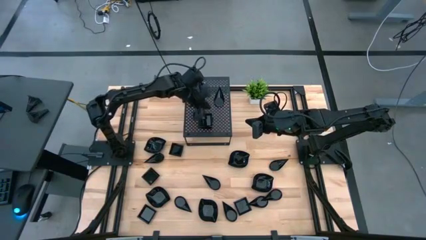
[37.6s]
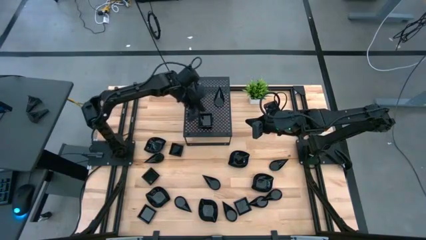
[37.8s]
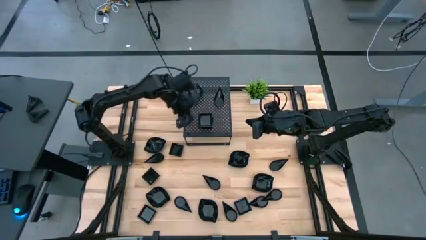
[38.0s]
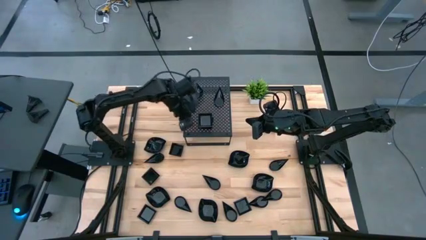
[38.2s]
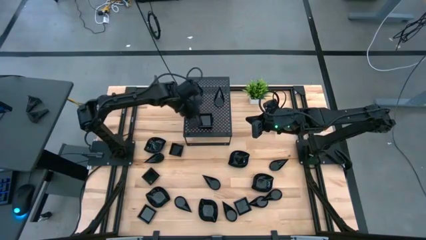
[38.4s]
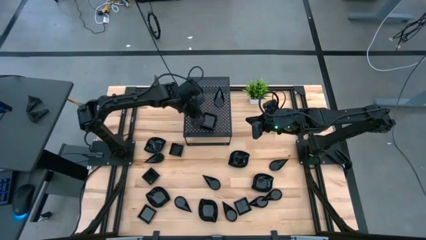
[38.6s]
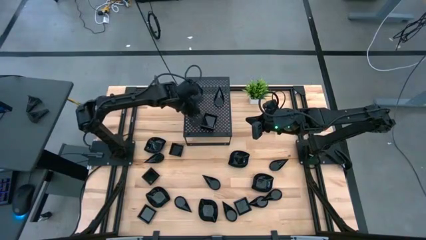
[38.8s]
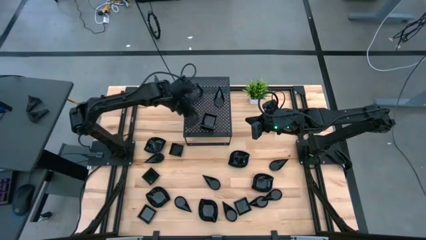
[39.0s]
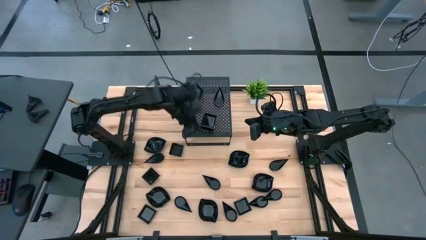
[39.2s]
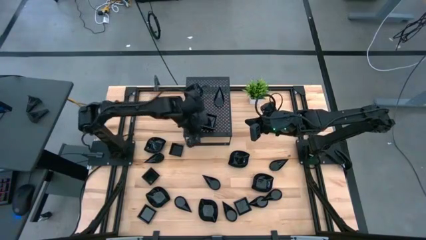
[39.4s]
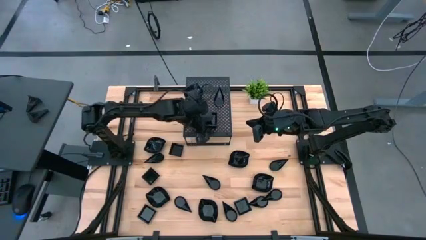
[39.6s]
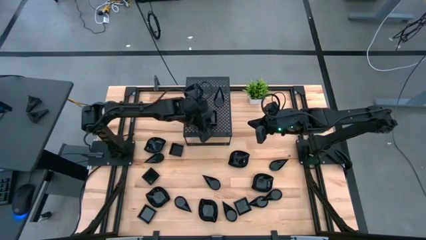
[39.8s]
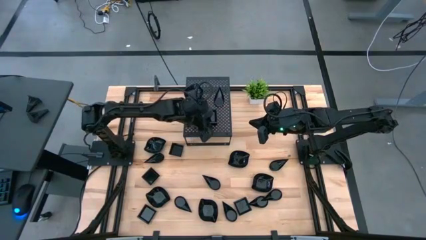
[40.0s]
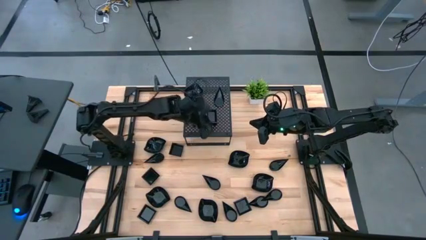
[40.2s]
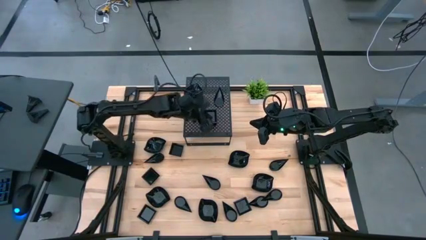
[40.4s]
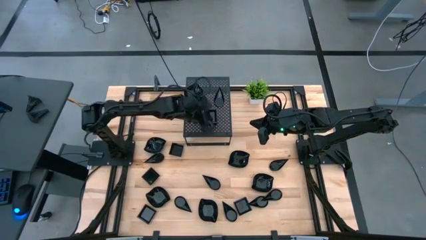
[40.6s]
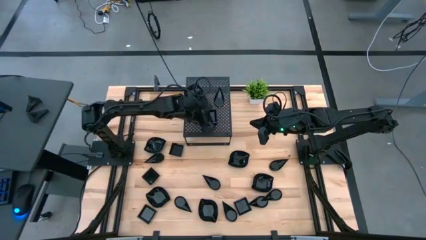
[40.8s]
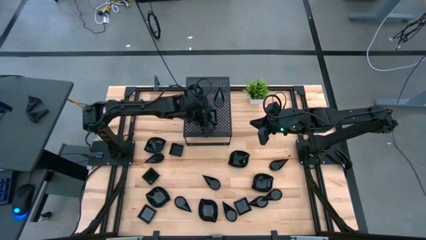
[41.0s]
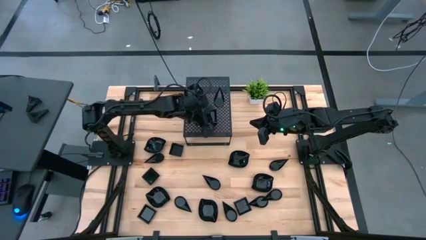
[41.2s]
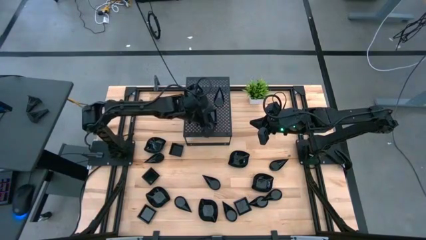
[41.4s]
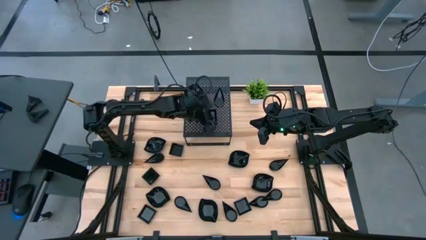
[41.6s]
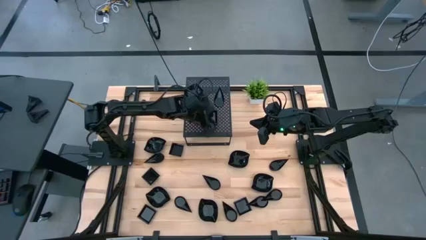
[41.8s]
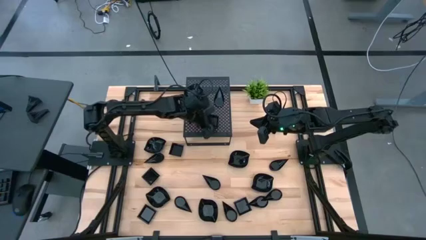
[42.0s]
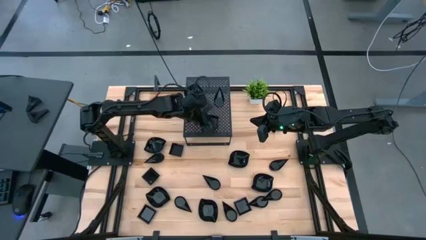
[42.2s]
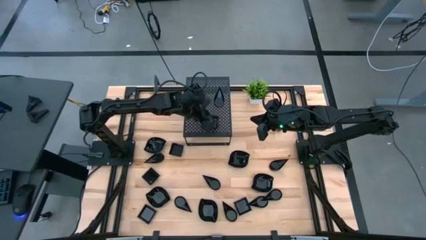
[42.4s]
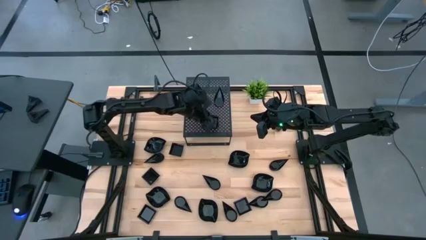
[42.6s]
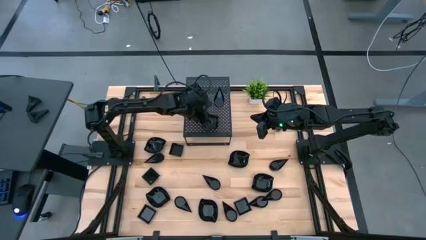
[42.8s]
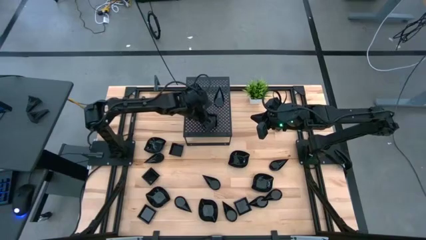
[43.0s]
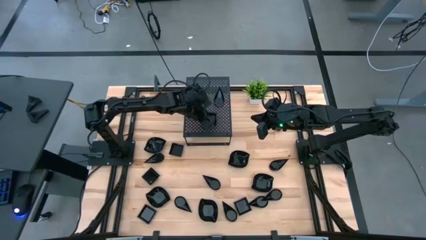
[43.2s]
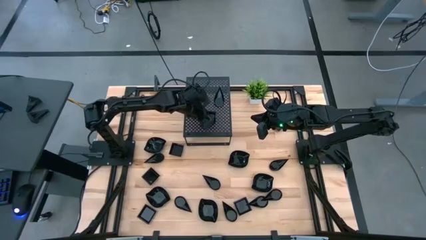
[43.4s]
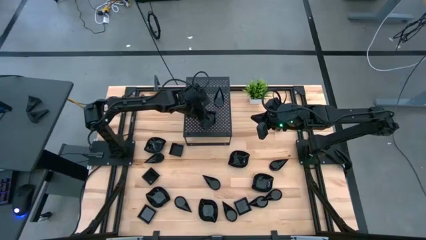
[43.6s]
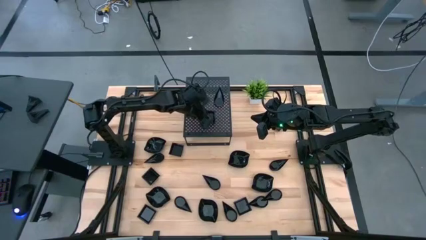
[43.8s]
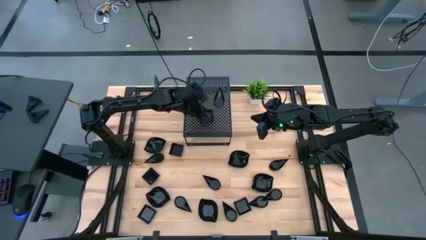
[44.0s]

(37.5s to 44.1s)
Task: Pick & Place Mini shaped plates
Adjust the square plates

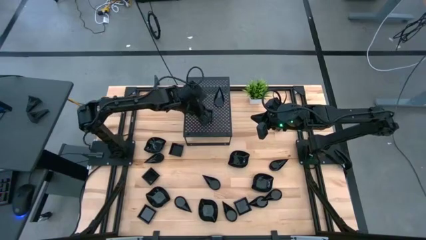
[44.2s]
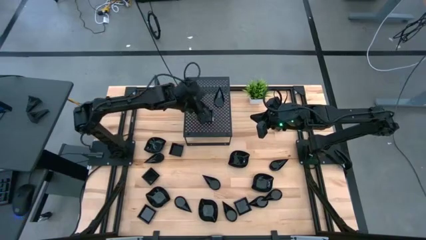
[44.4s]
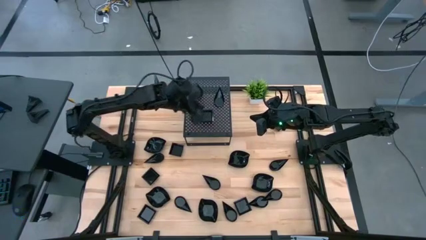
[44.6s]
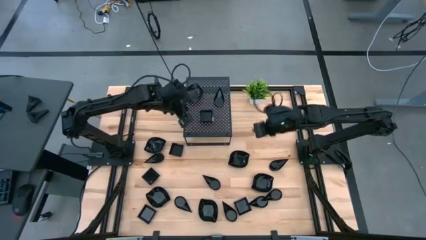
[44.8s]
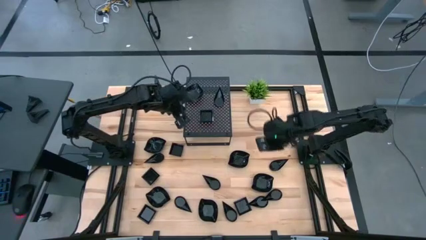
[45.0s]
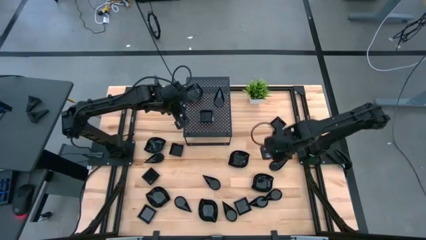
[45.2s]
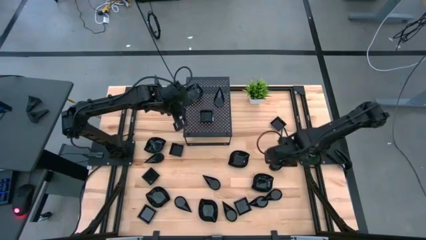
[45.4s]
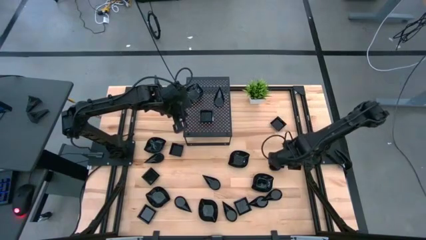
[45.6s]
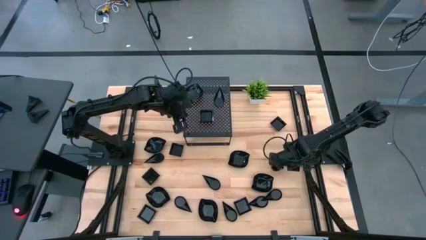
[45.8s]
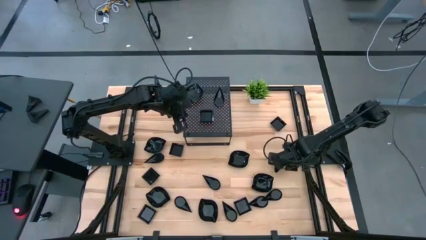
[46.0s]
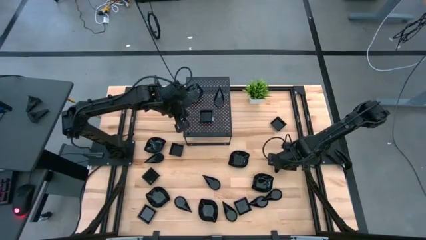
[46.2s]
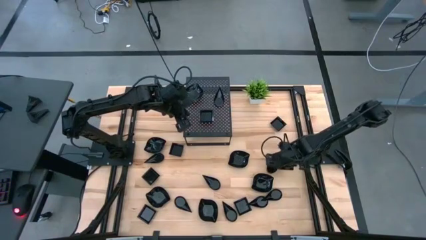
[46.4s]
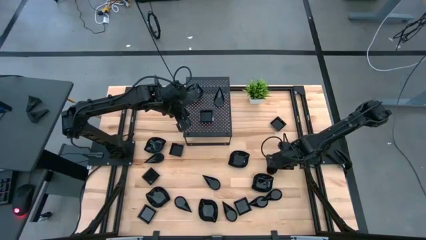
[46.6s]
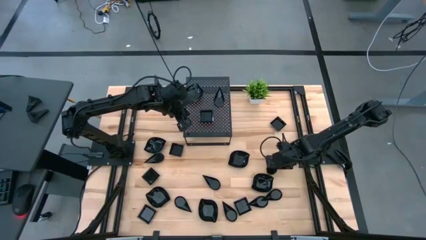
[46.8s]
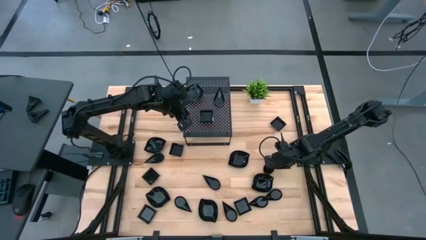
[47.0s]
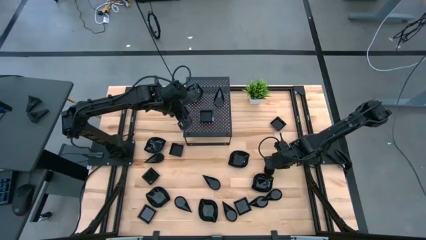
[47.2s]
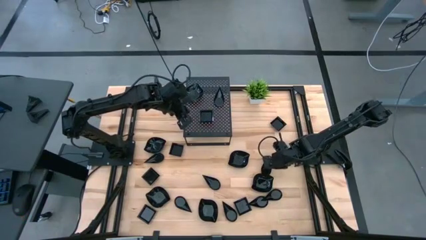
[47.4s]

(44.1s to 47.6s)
Stack the drop shaped plate on top of the other drop shaped plate on the shelf

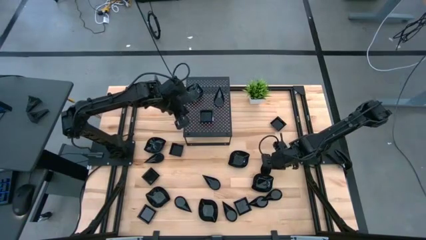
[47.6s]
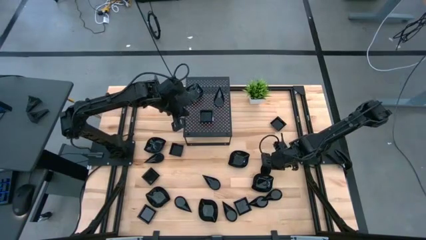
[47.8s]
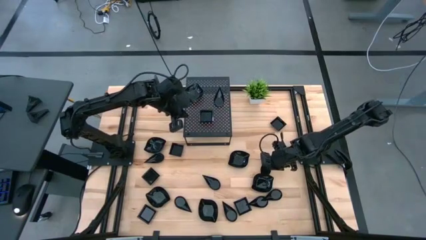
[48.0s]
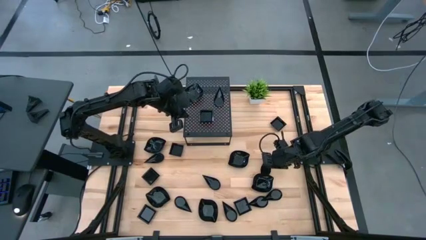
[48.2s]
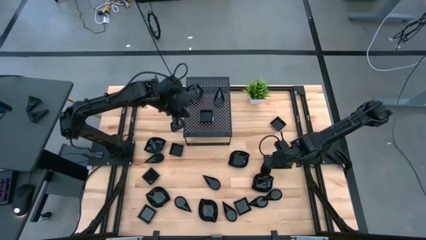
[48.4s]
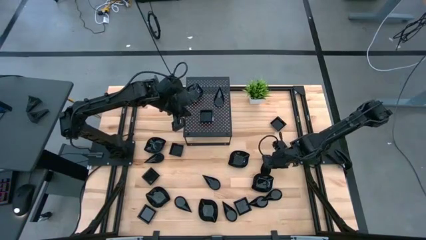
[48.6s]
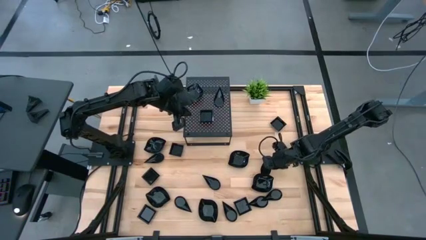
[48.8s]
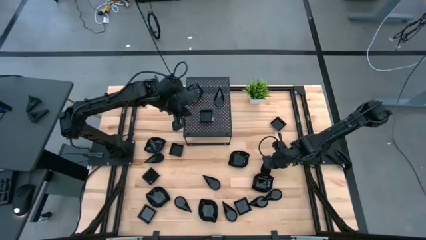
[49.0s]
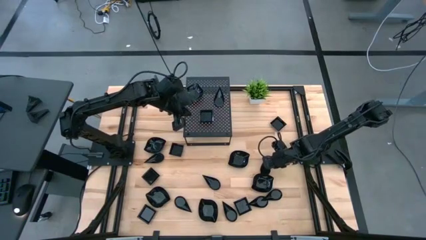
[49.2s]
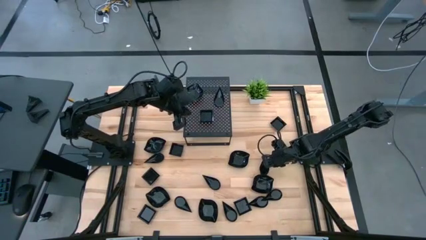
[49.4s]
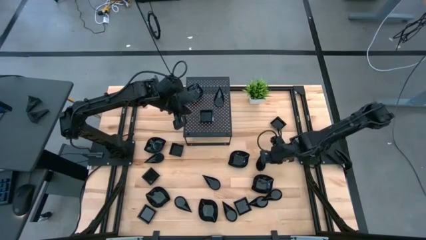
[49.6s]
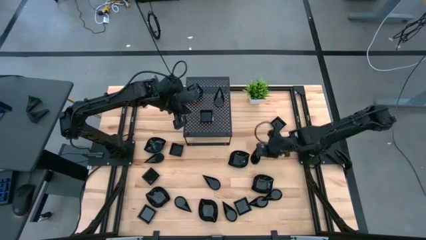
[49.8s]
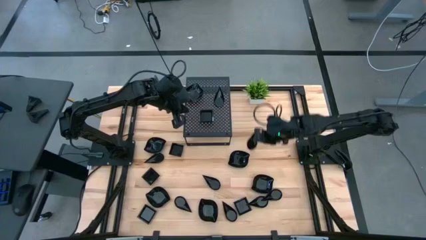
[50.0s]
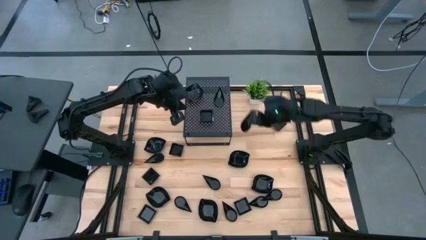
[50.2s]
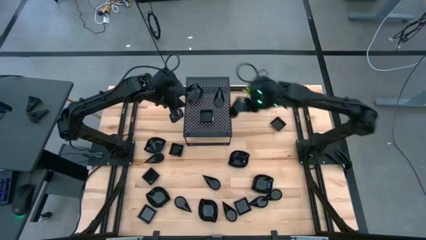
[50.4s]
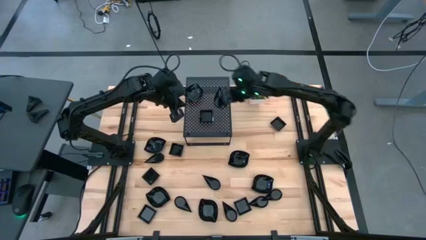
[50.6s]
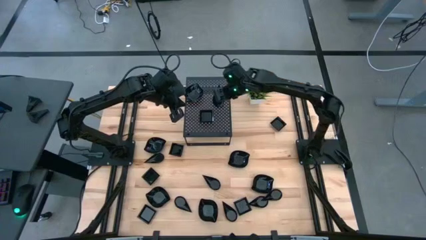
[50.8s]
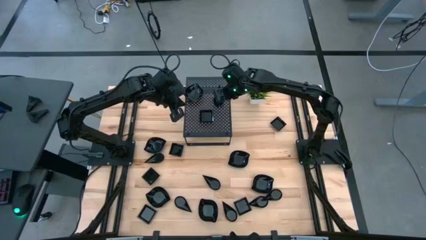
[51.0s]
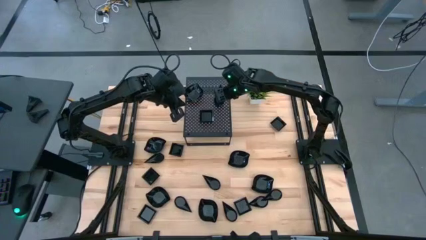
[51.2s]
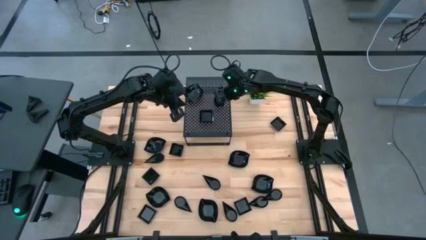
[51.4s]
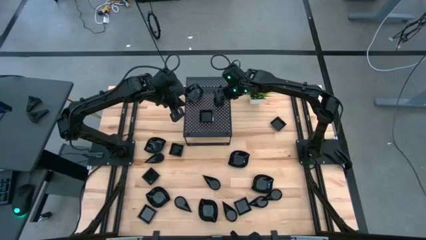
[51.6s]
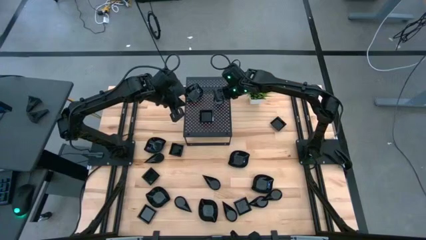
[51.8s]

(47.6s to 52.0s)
Stack the drop shaped plate on top of the other drop shaped plate on the shelf

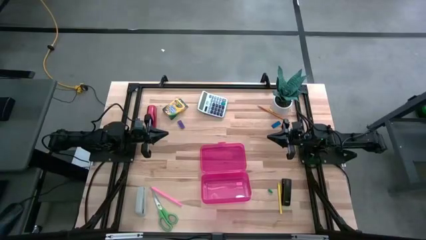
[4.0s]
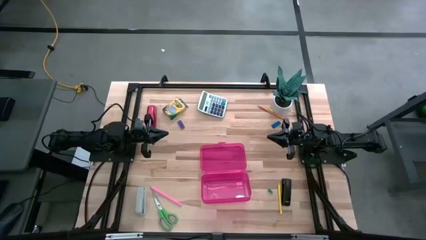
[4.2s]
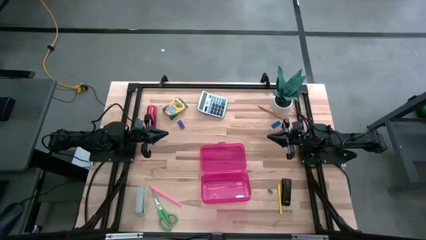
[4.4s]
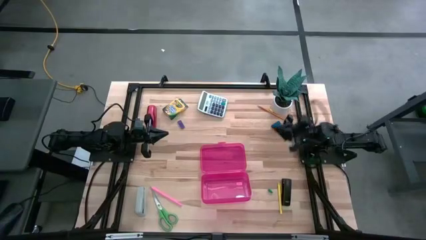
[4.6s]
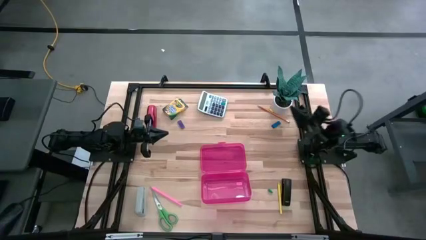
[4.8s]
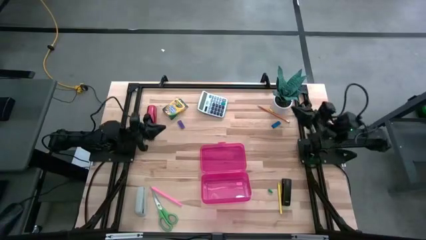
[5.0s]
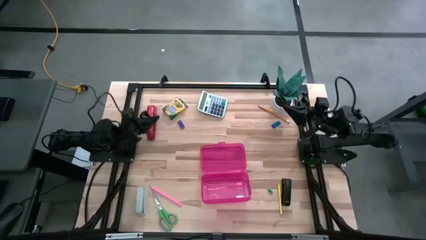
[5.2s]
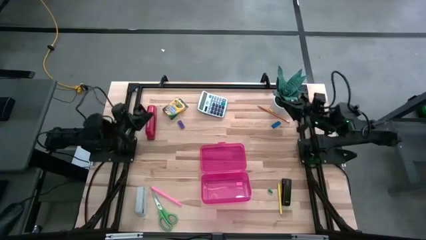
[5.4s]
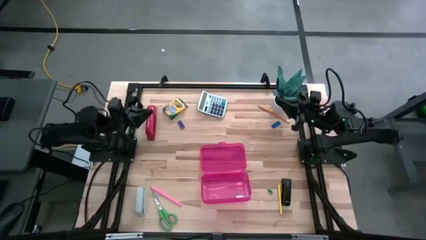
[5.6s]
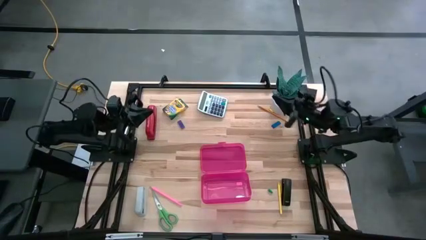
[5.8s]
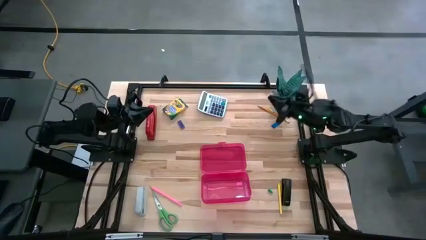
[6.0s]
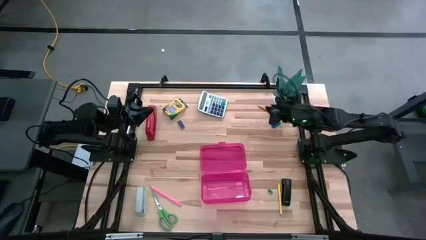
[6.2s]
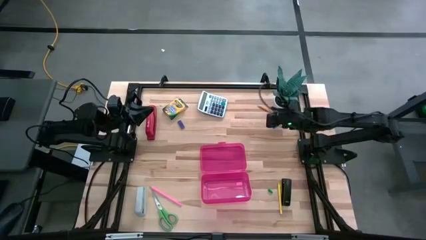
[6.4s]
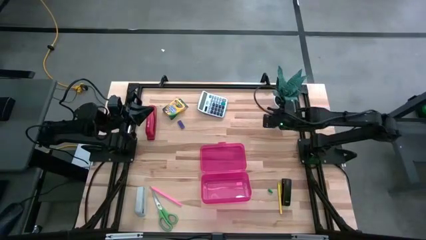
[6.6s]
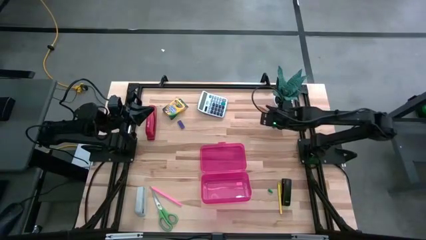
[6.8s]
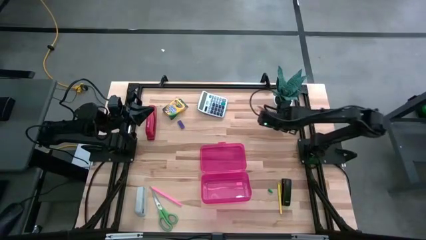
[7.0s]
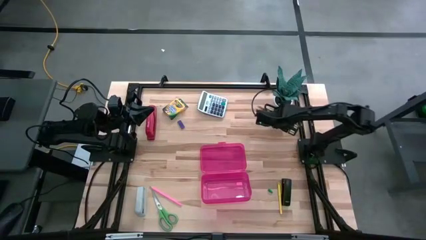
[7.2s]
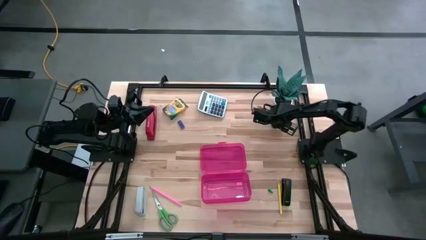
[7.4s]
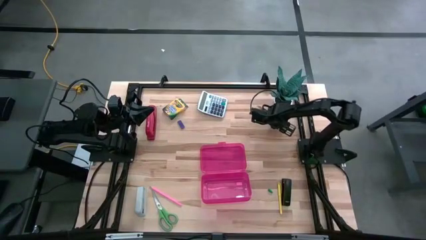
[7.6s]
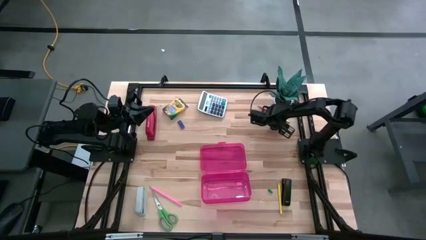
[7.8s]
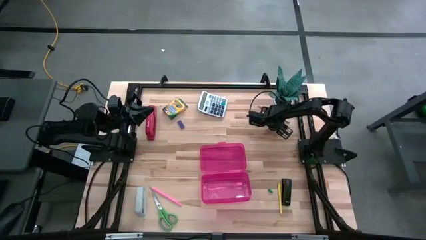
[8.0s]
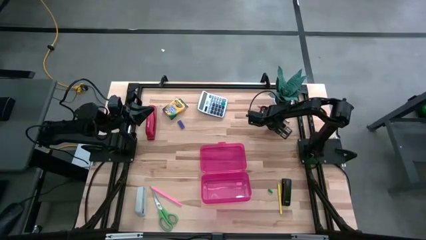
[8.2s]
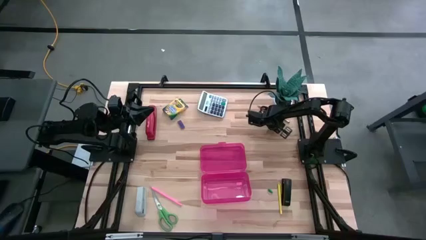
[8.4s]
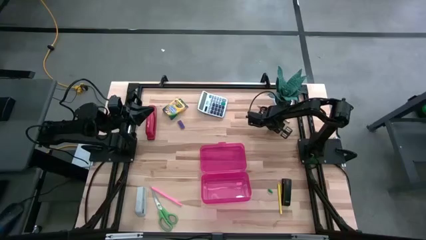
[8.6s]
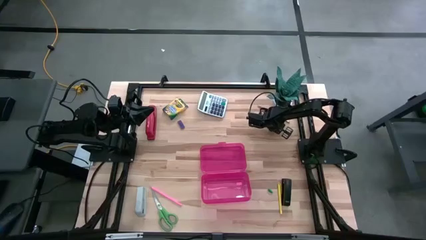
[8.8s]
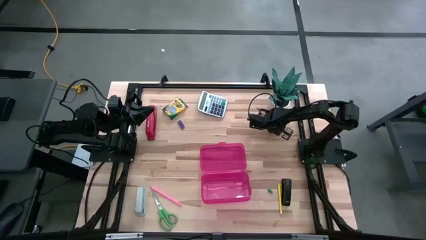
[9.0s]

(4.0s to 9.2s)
Task: Pack school essentials
Put the blue eraser into the pink supply box
